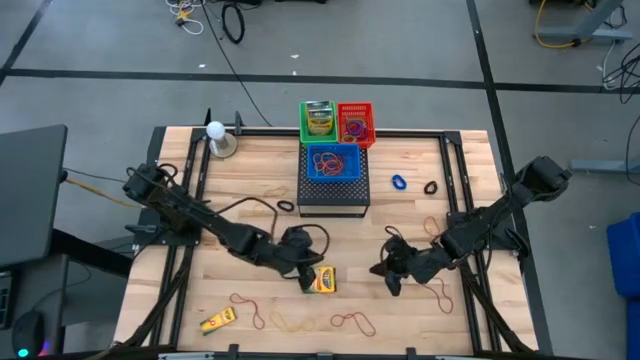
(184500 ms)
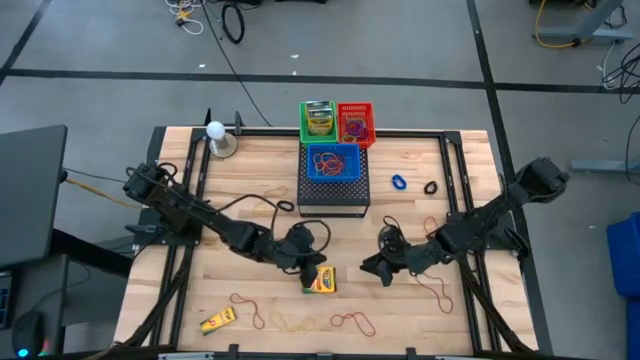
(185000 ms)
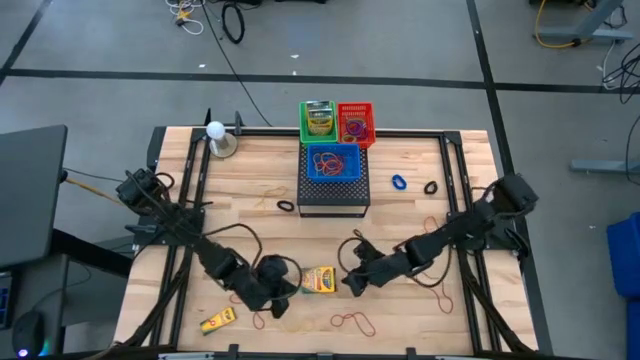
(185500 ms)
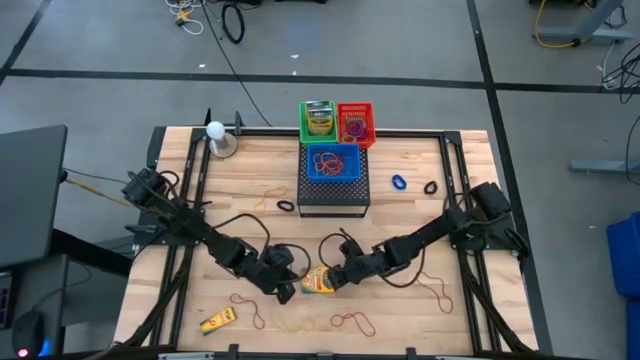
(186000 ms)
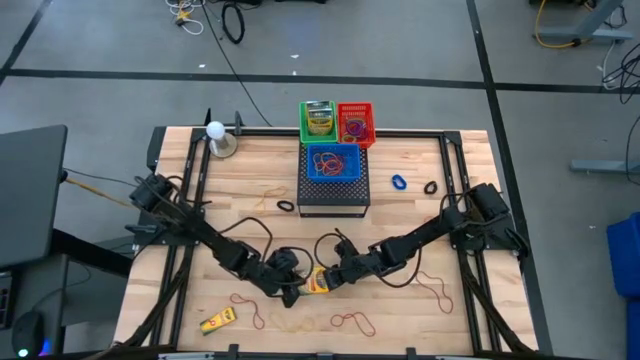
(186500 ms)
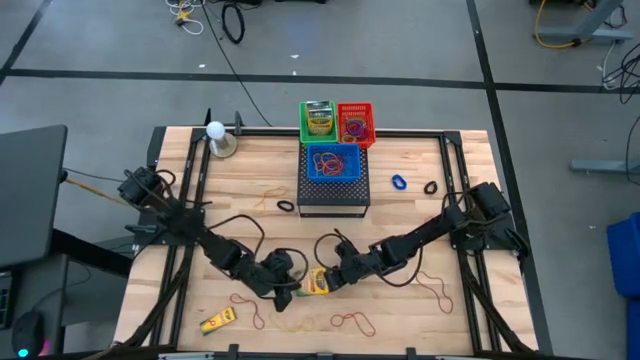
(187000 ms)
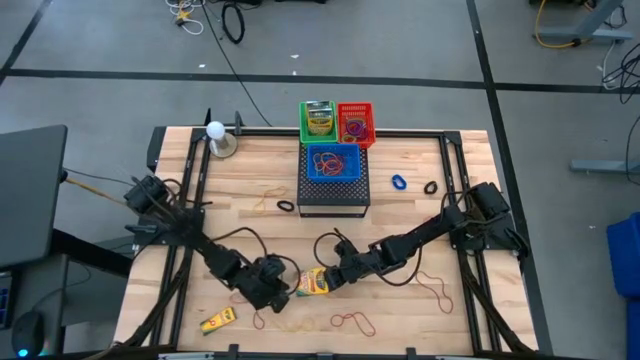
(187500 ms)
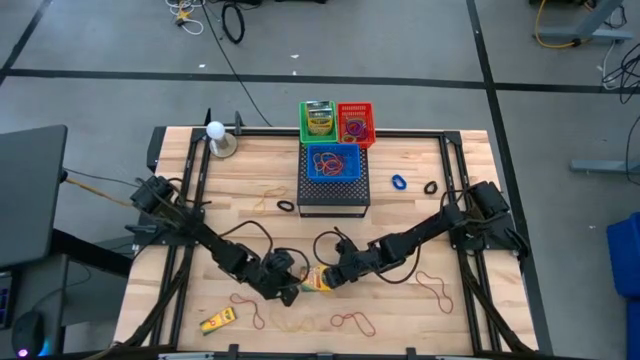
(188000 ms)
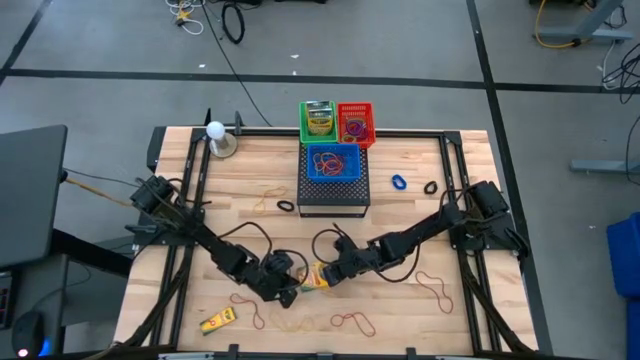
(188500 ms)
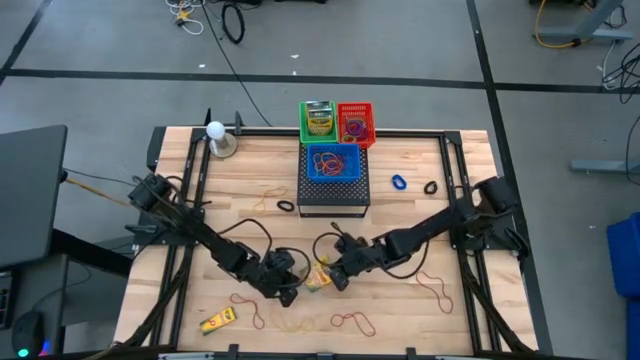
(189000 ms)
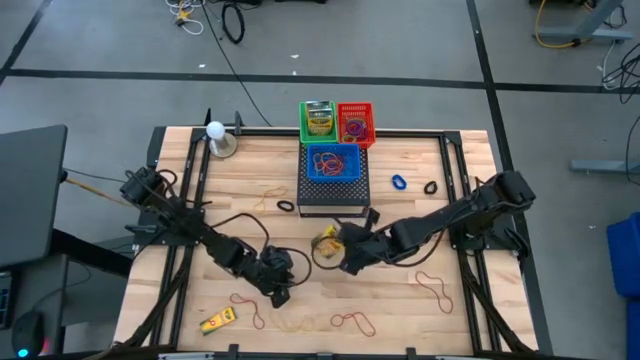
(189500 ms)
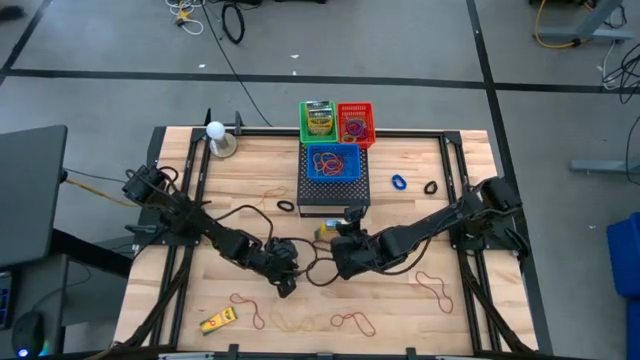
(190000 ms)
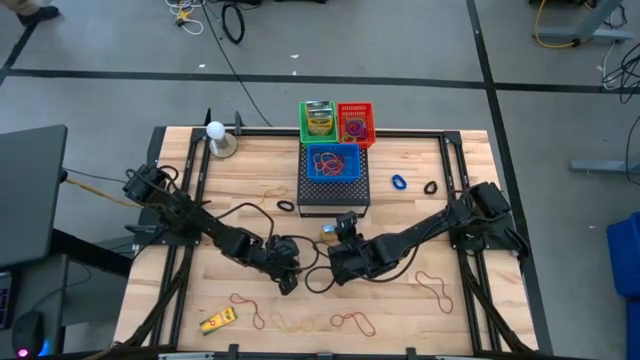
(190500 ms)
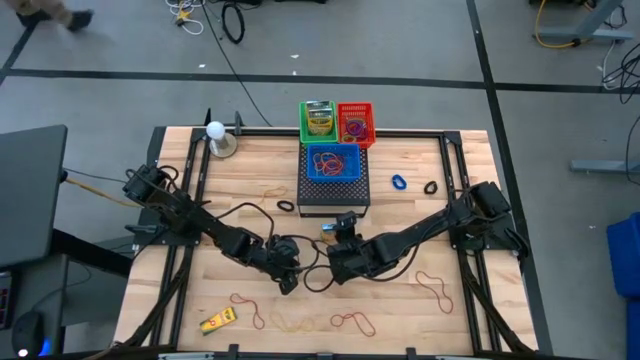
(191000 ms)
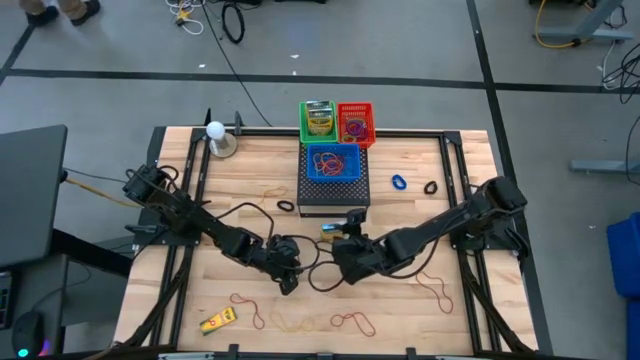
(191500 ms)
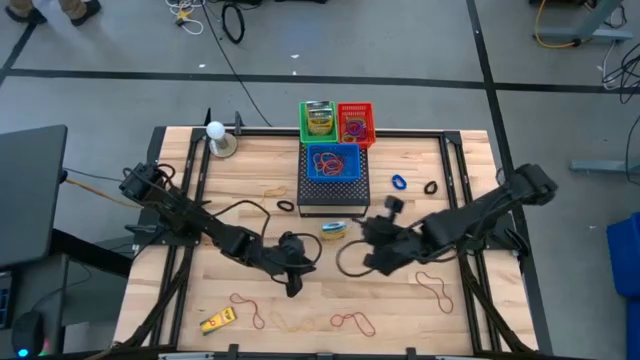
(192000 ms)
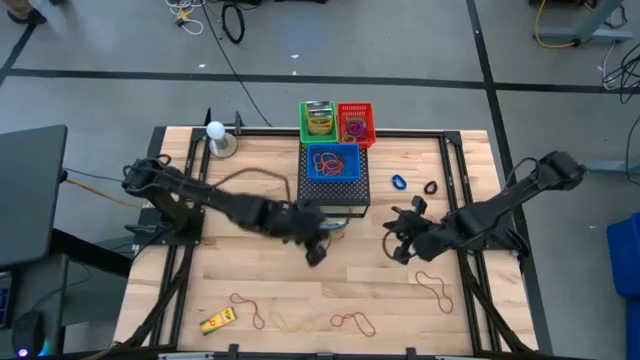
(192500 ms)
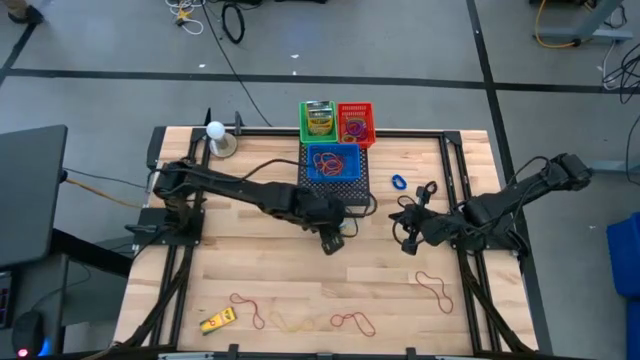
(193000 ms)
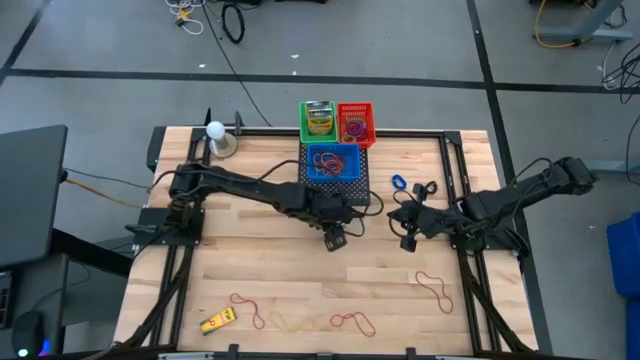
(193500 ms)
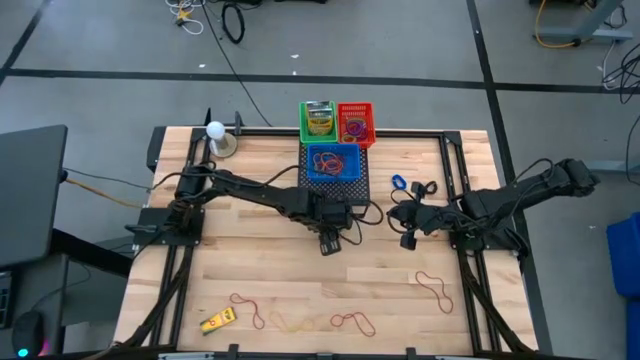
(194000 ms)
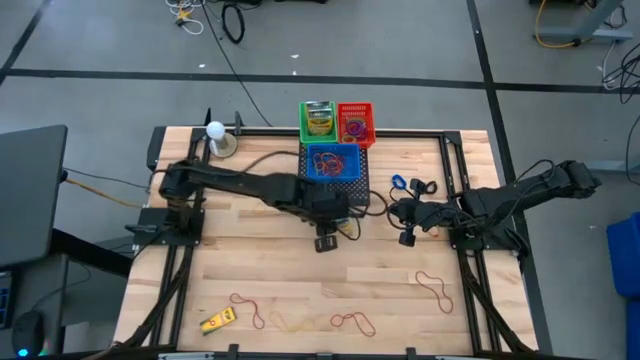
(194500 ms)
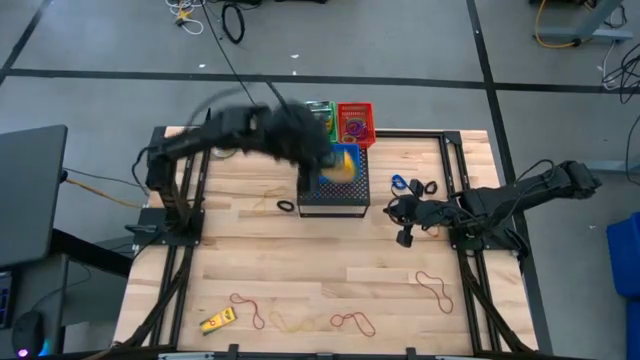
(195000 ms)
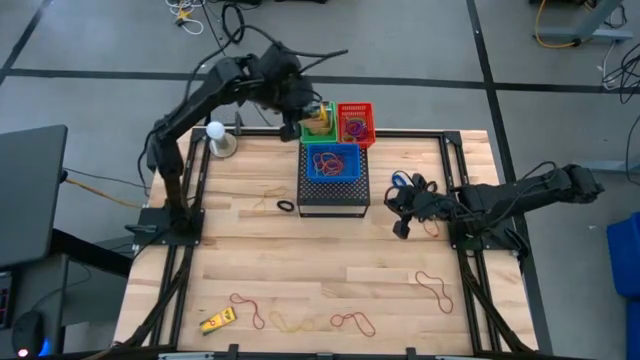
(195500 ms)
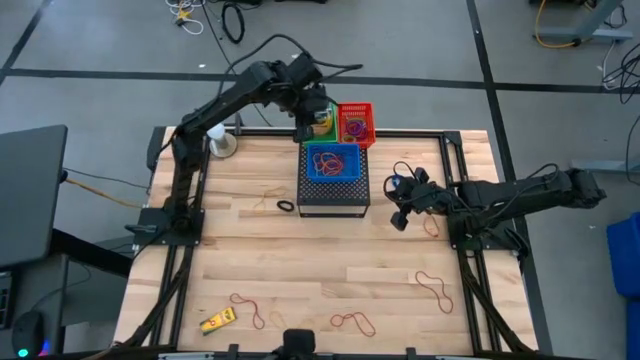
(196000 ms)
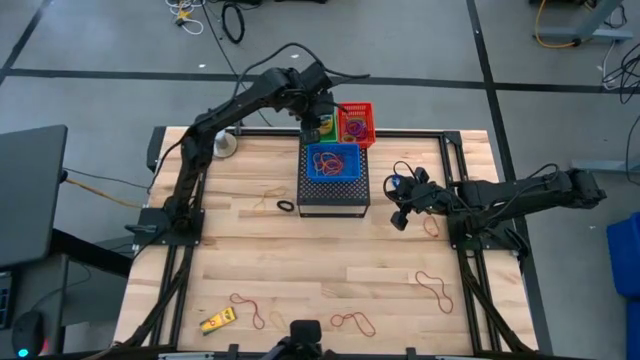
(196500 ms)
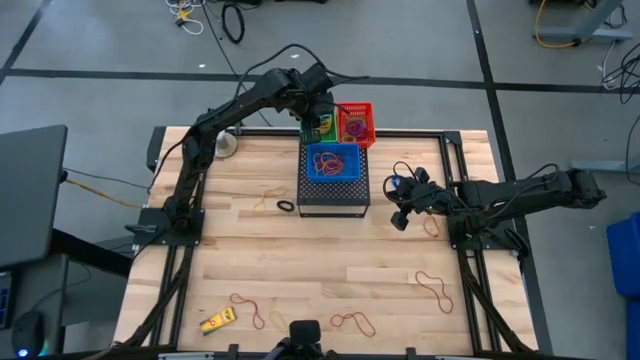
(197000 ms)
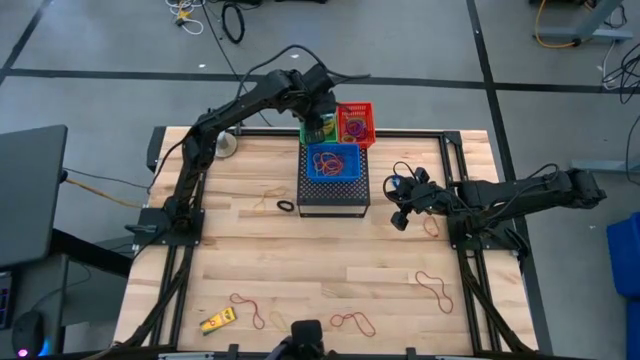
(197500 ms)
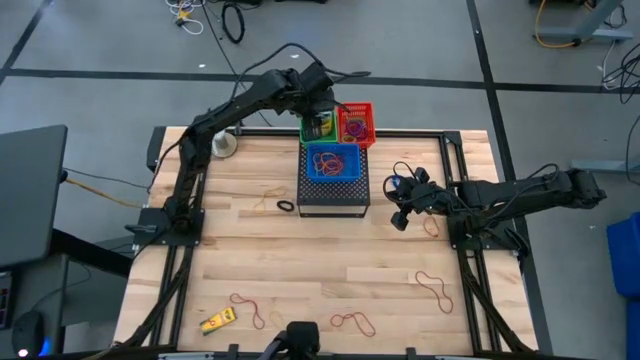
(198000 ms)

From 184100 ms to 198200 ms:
Task: Pick & Place Office Desk Supplies
Put the red rubber band into the blue bin on the shelf

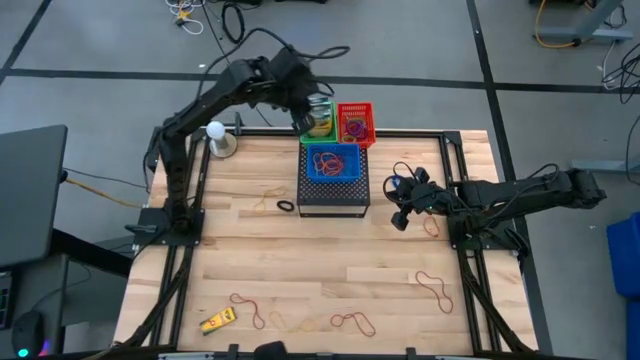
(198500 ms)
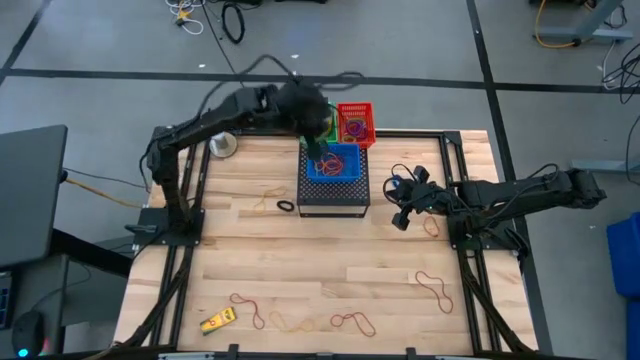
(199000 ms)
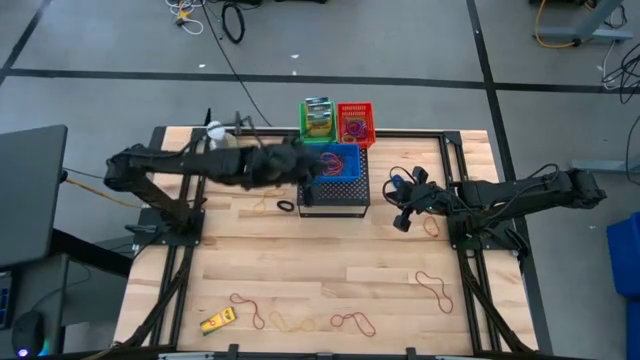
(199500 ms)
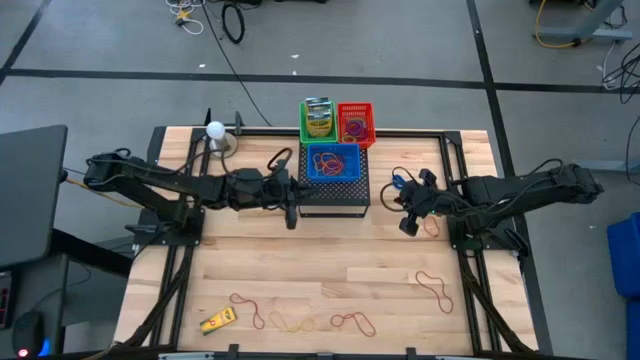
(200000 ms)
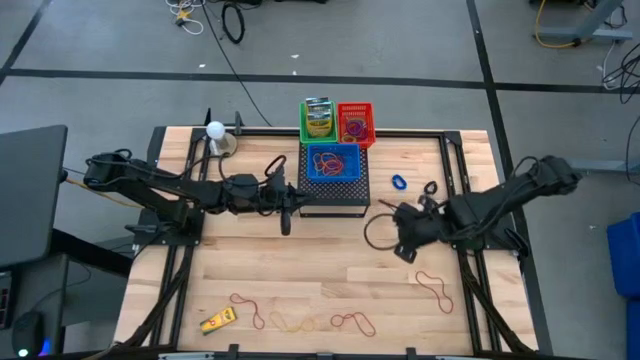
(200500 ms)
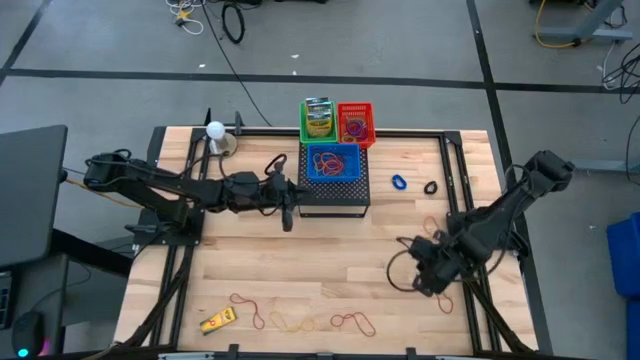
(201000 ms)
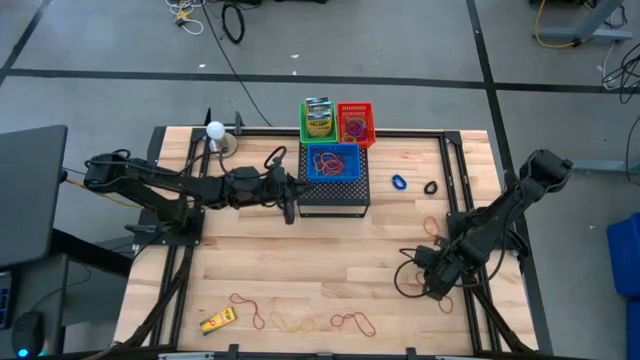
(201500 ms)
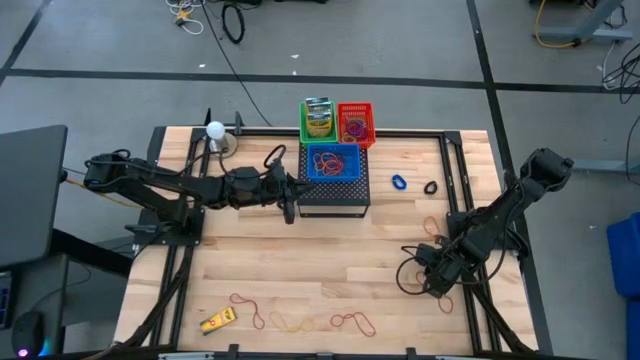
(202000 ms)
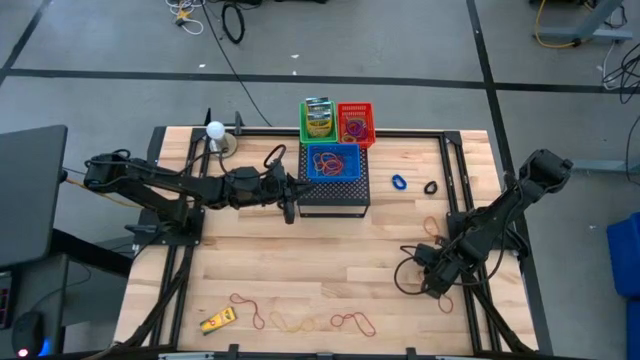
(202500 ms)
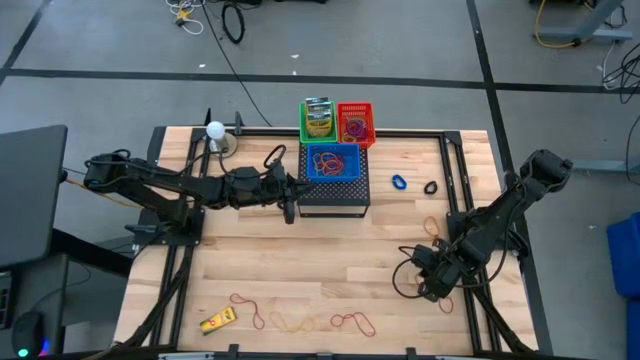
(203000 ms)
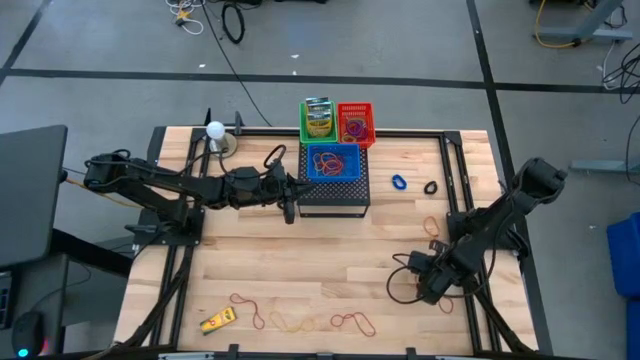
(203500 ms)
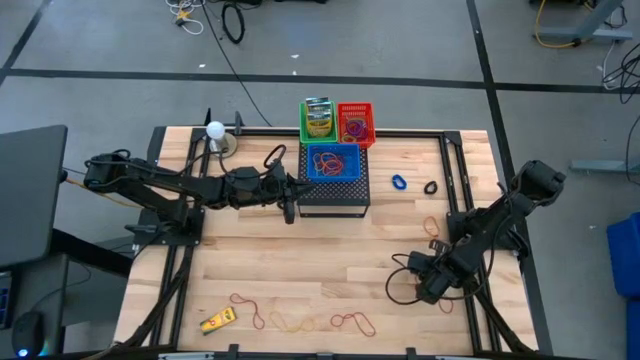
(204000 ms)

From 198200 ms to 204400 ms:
Put the red rubber band into the blue bin on the shelf

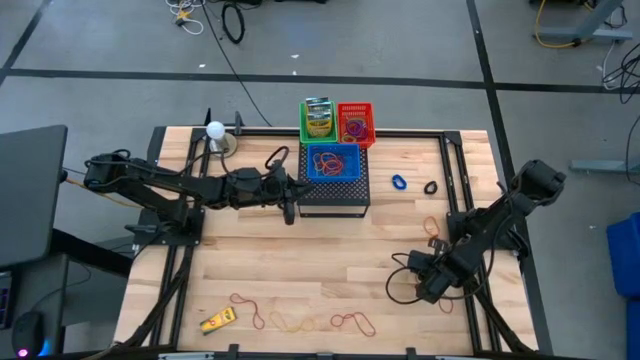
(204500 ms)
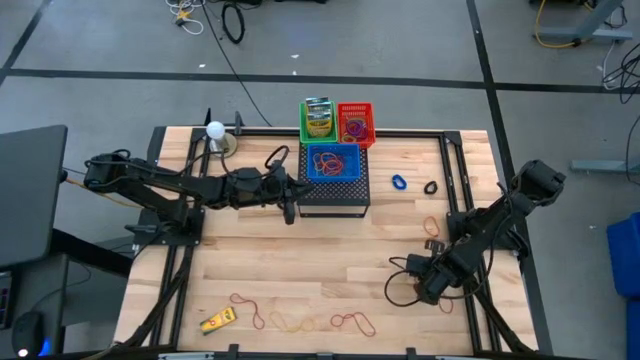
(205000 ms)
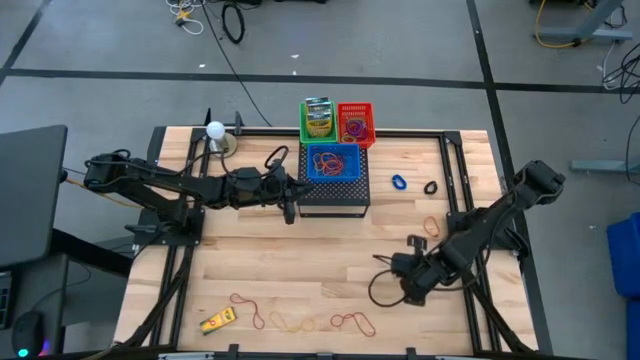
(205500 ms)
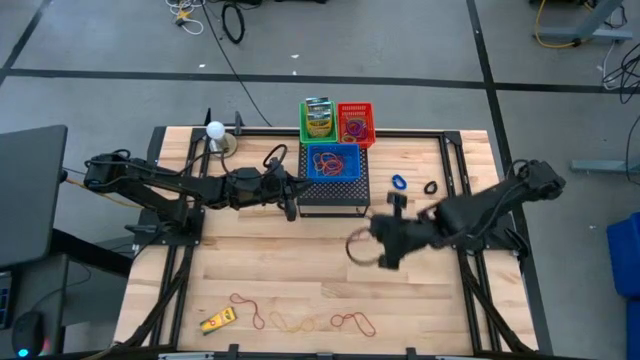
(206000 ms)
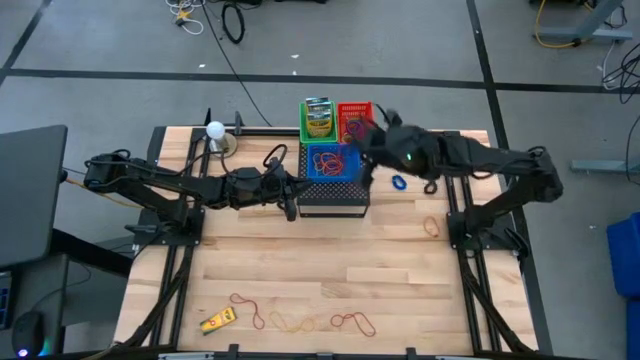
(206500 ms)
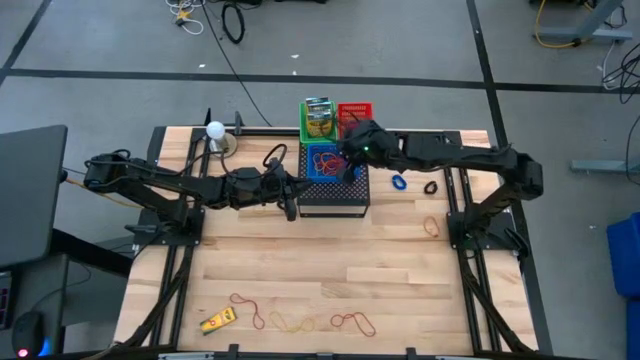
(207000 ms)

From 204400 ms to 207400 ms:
Put the red rubber band into the blue bin on the shelf
